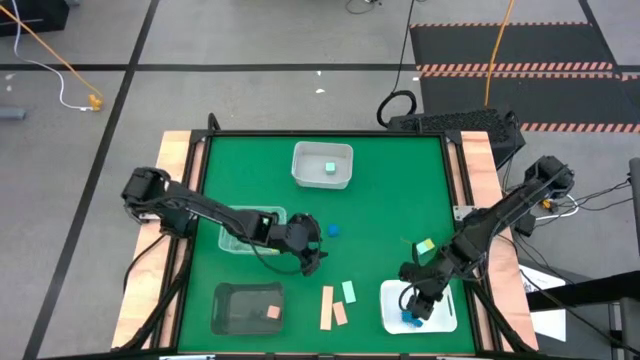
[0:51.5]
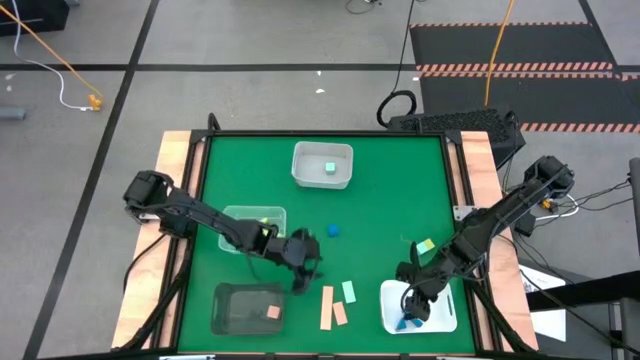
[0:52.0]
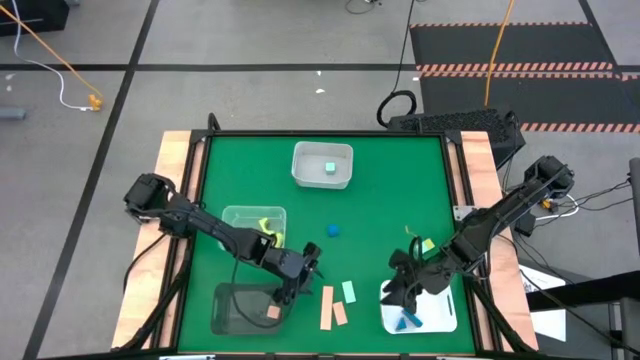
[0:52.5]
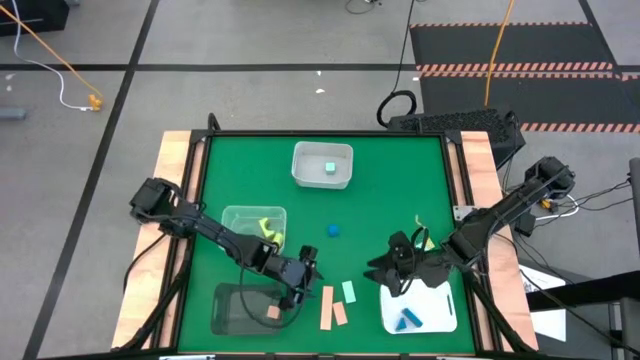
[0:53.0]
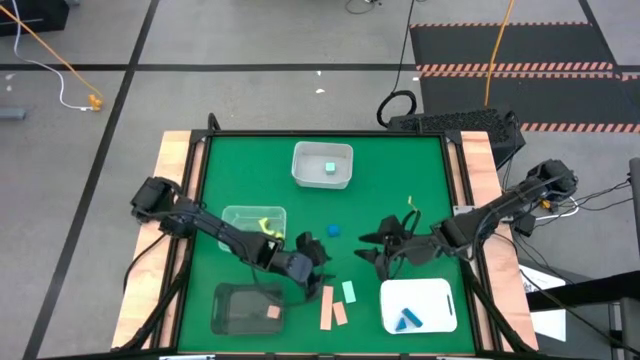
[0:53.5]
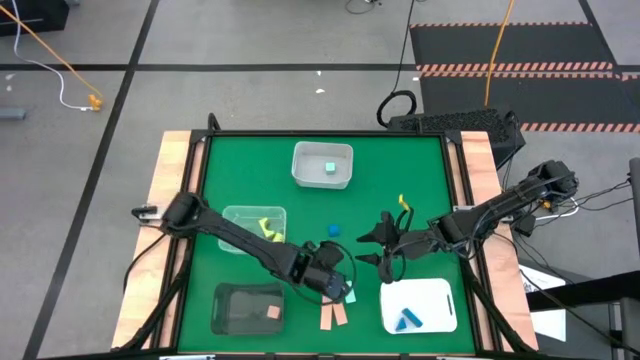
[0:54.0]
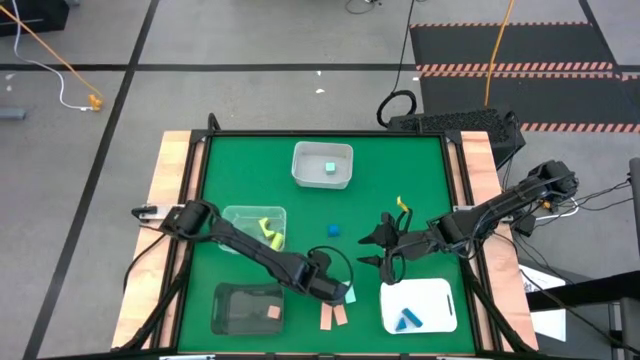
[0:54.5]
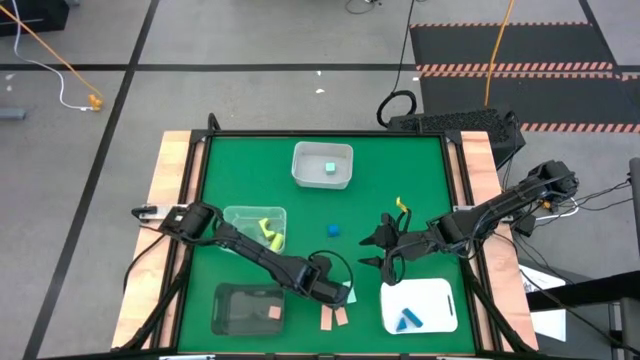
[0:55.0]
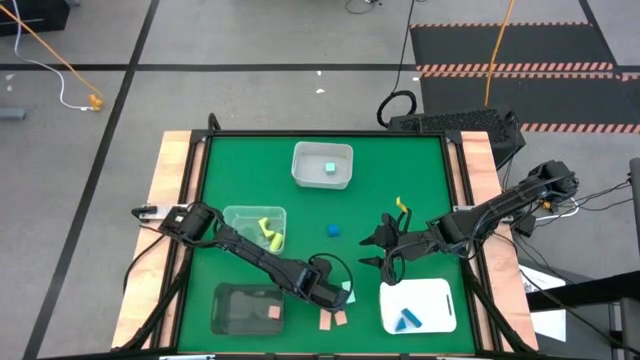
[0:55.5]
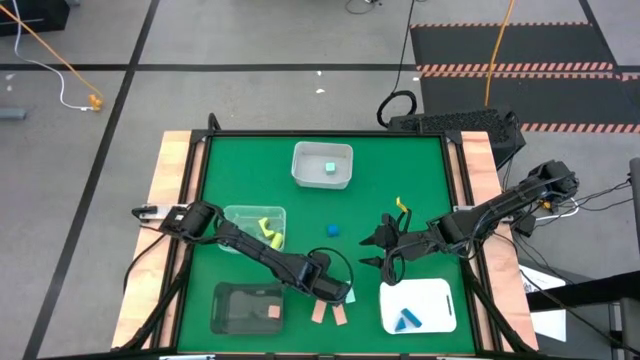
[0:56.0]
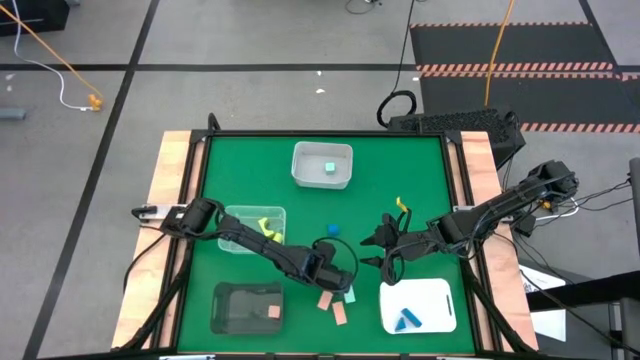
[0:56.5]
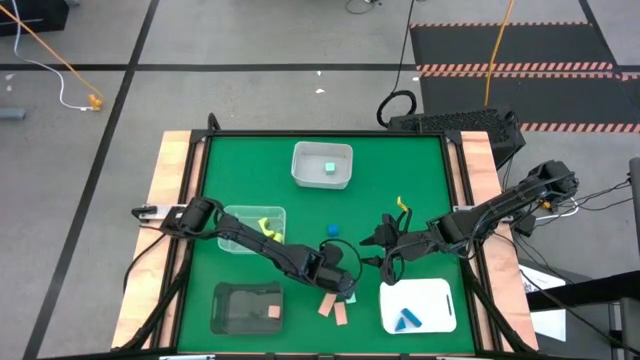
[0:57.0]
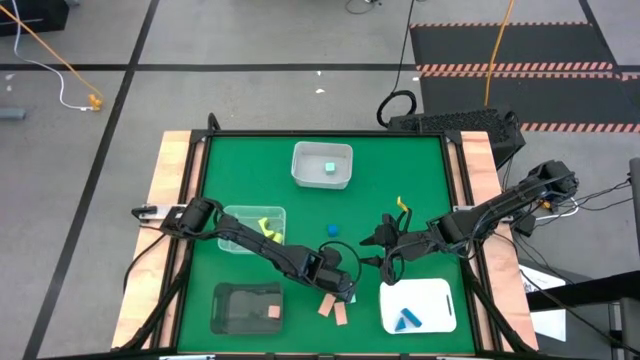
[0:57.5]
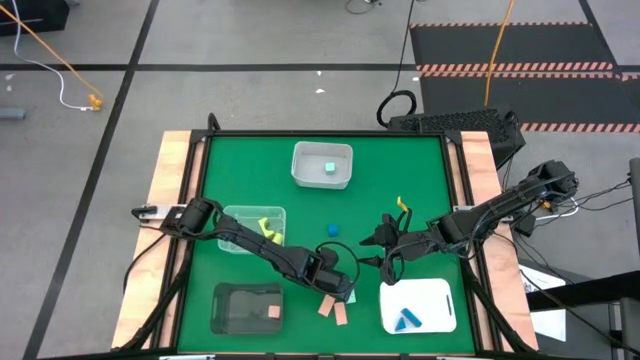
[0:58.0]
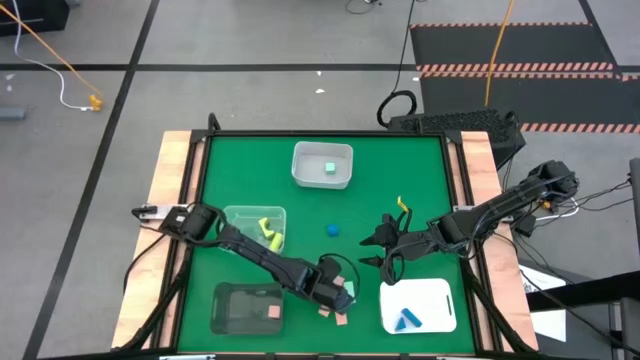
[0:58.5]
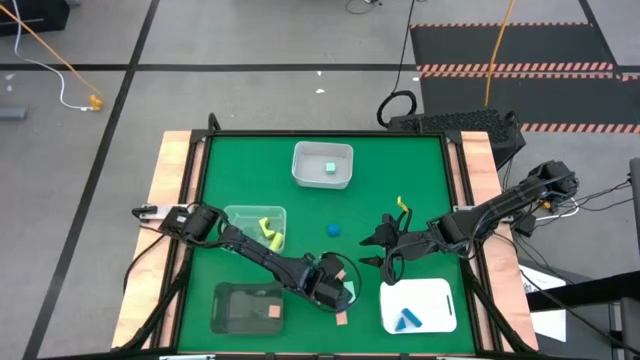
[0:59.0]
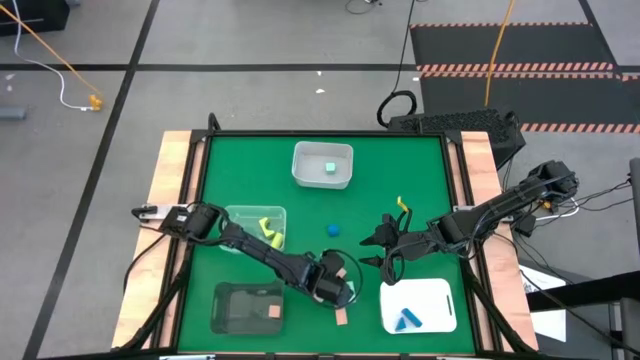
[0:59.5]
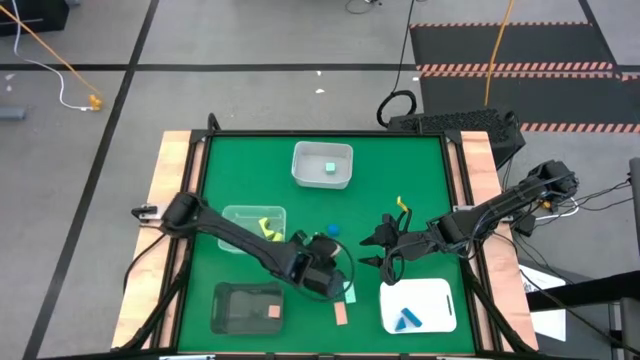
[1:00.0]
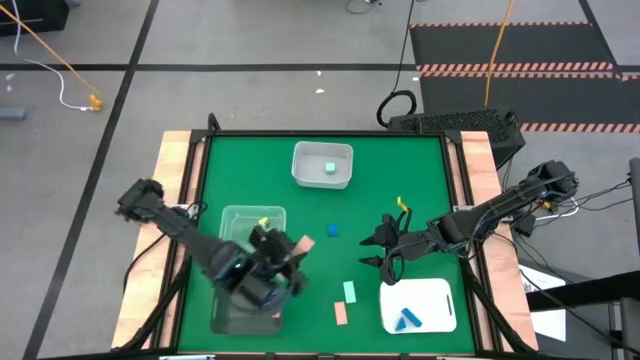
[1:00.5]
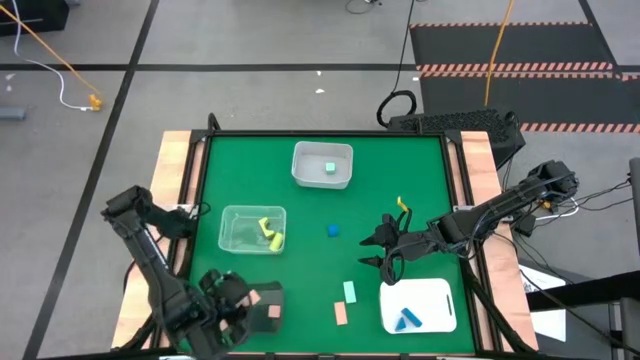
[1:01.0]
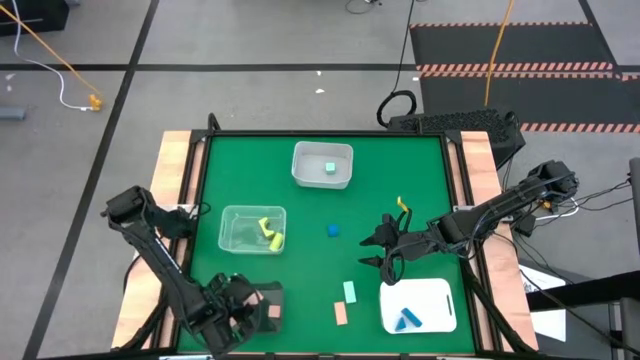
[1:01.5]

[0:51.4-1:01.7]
Task: Sort & place blocks by color
Put the left light brown block into the black bin

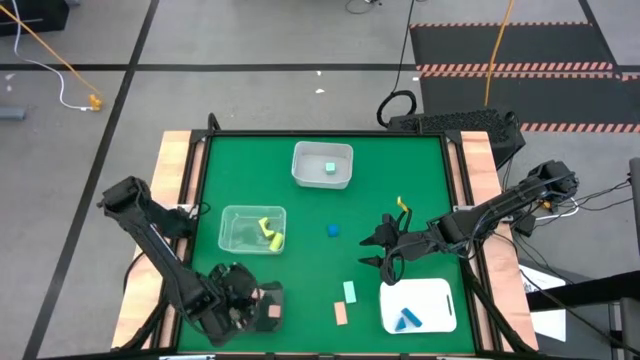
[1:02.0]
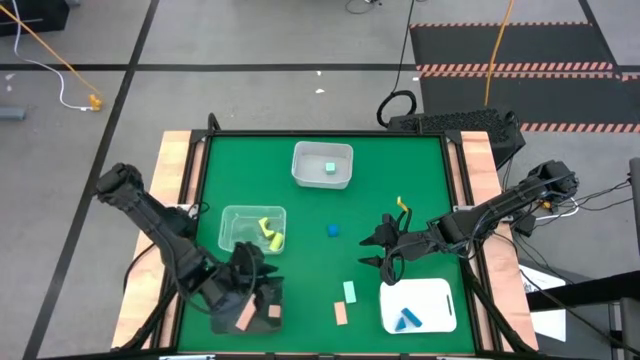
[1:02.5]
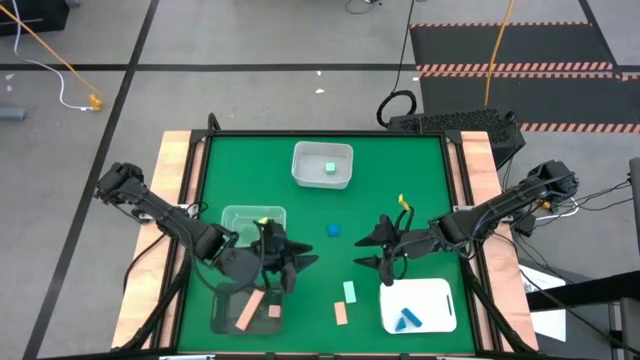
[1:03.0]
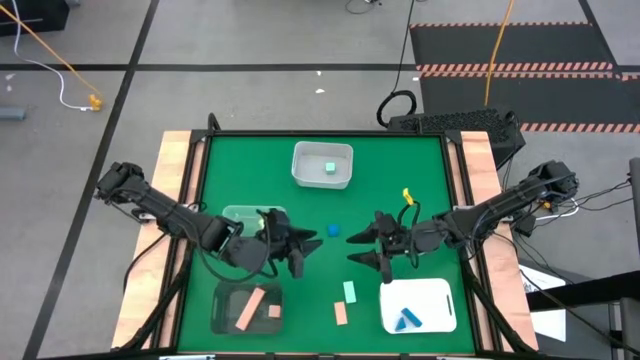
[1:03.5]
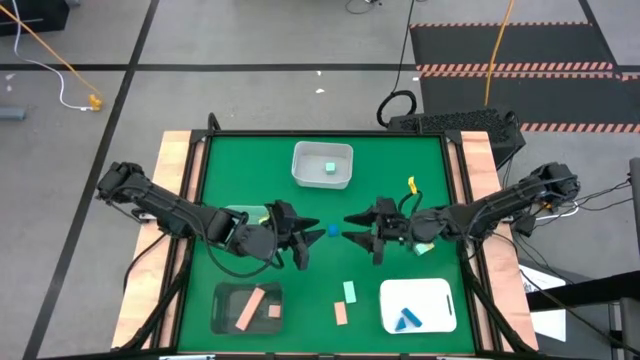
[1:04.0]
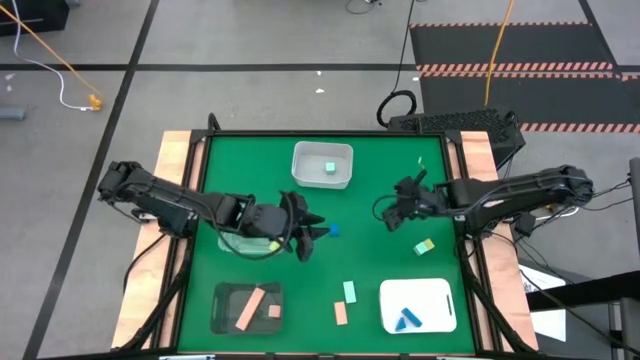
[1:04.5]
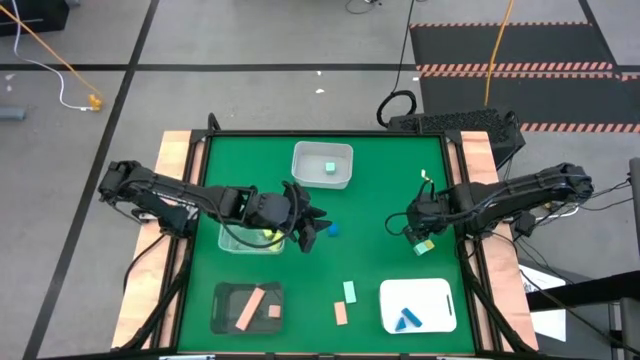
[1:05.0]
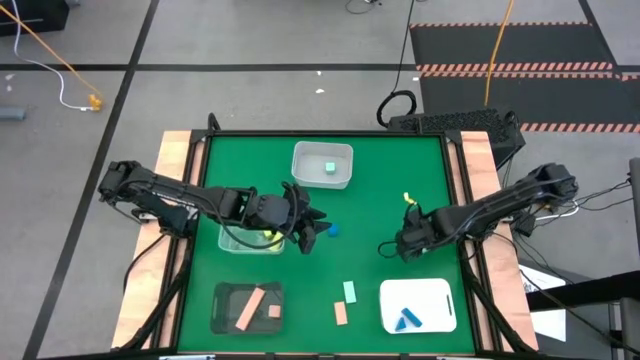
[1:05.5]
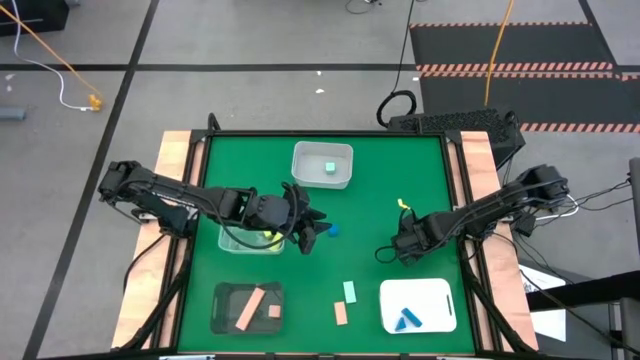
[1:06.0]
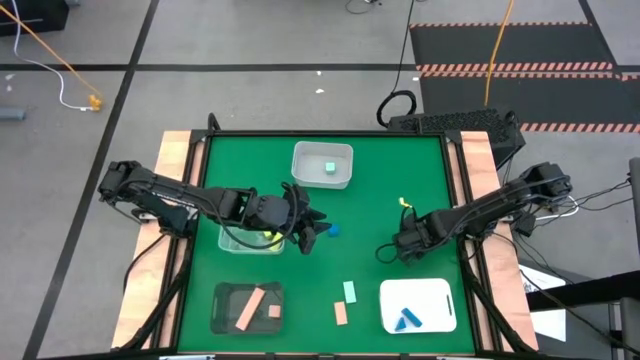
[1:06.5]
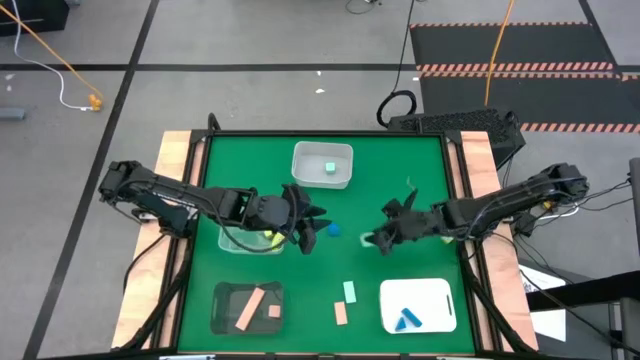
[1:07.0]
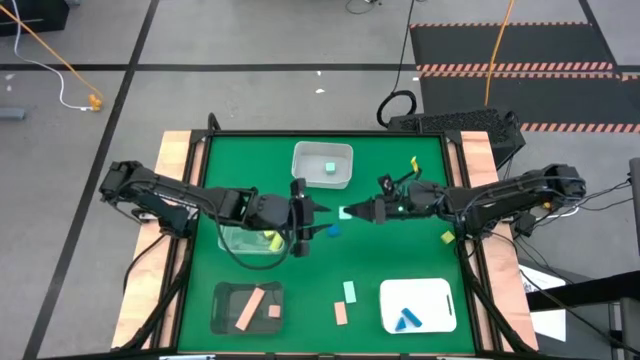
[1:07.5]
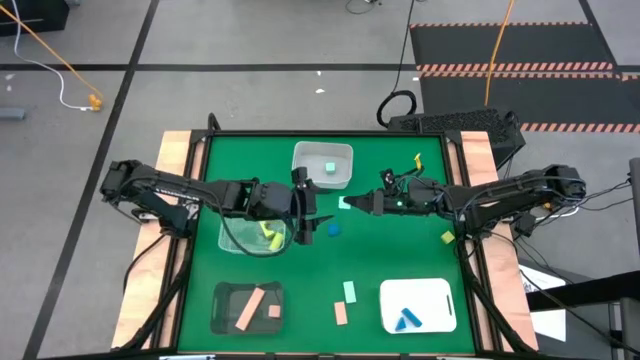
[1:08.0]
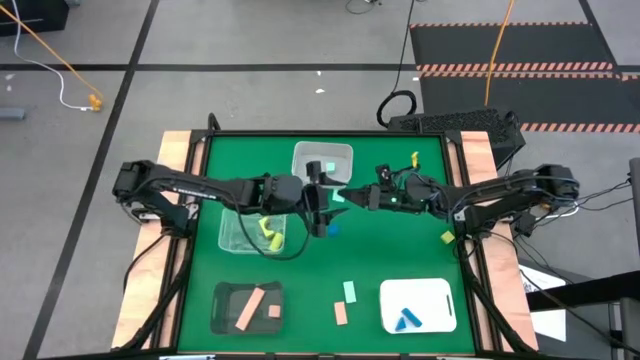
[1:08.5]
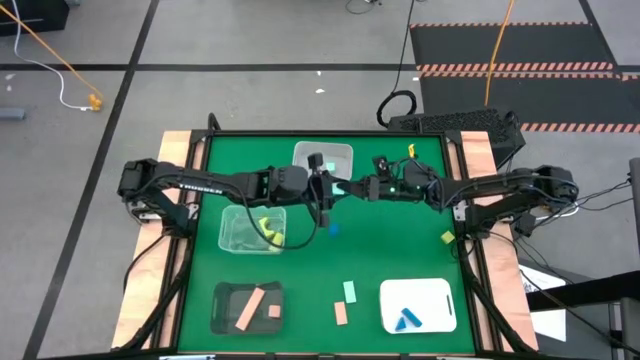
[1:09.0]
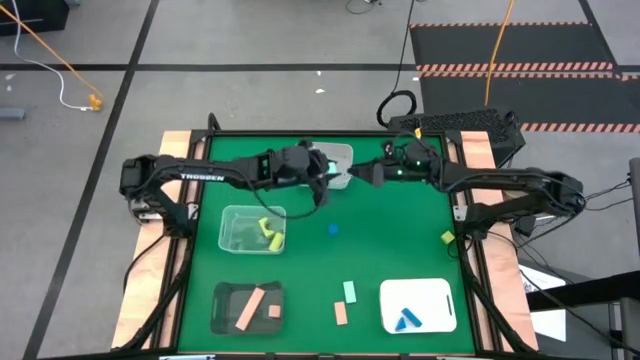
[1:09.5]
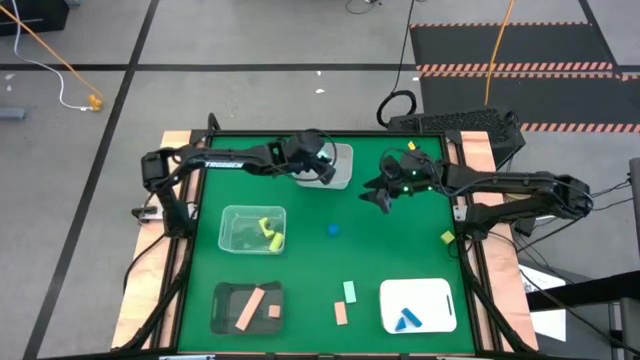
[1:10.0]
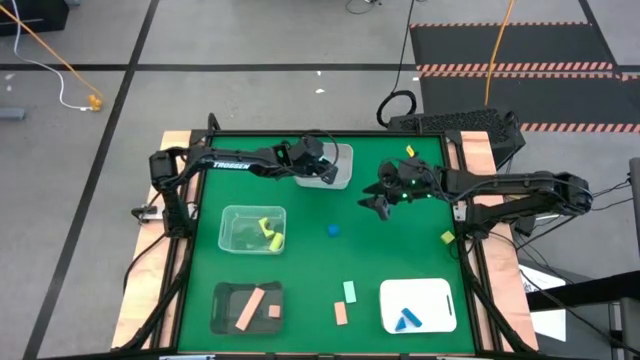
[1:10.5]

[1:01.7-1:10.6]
Put the right light blue square block into the top white bin

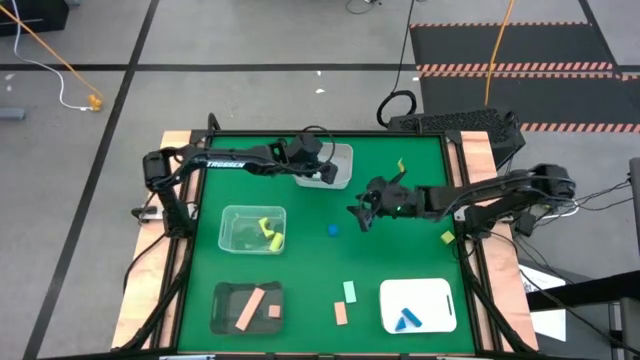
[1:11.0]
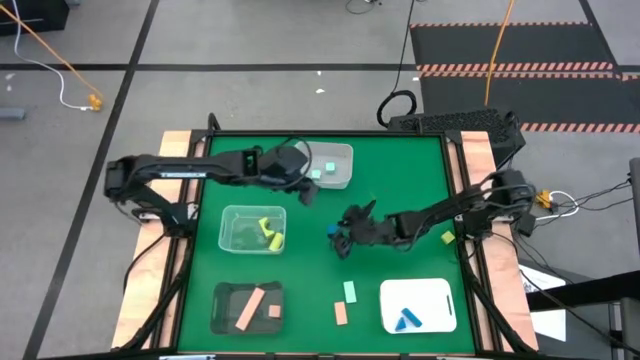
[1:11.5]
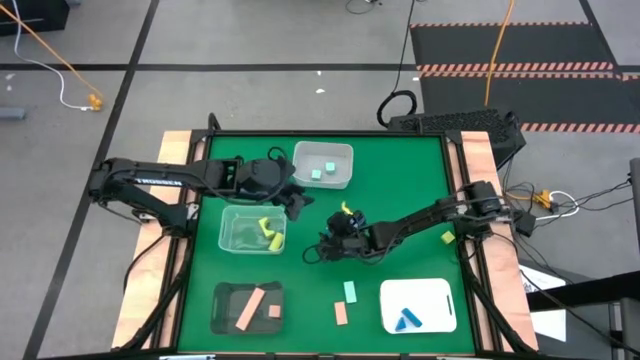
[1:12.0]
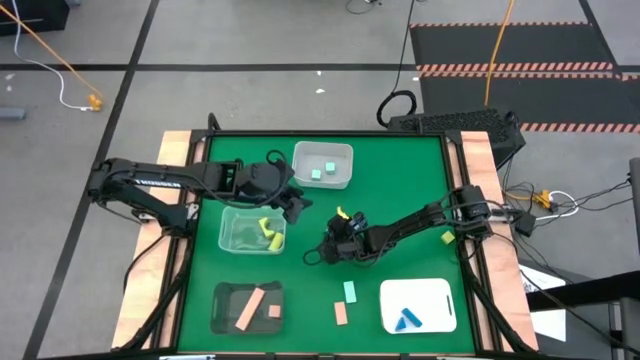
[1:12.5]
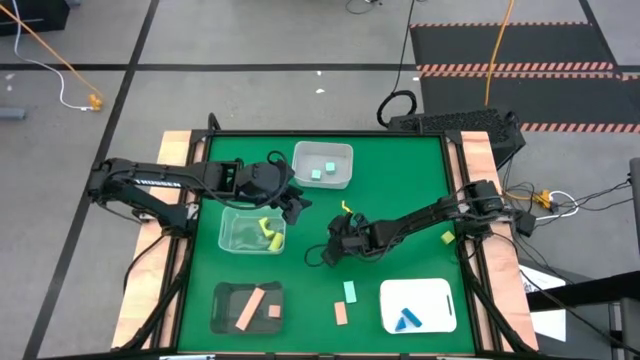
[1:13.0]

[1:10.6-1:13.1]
Put the blue block into the bottom white bin
